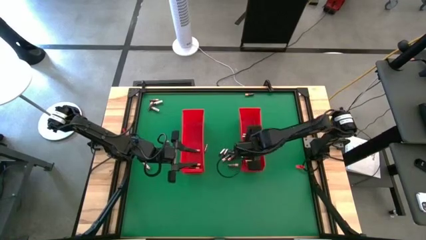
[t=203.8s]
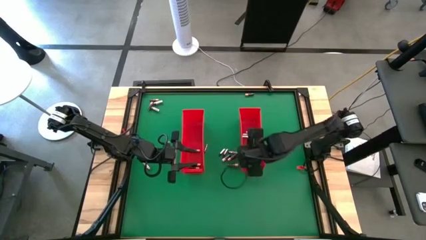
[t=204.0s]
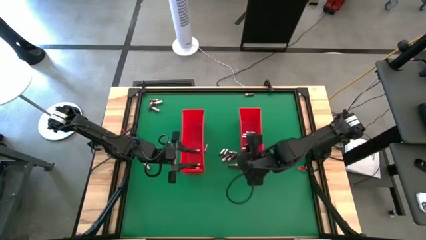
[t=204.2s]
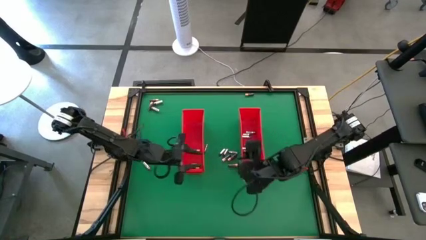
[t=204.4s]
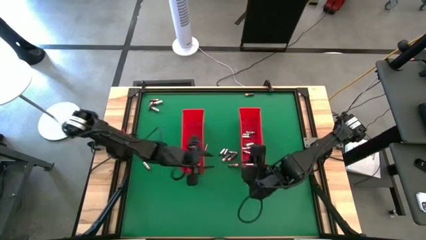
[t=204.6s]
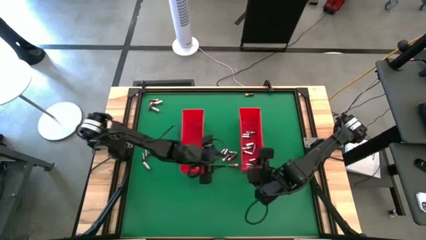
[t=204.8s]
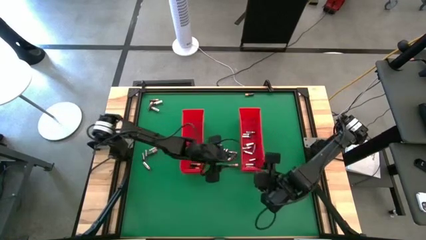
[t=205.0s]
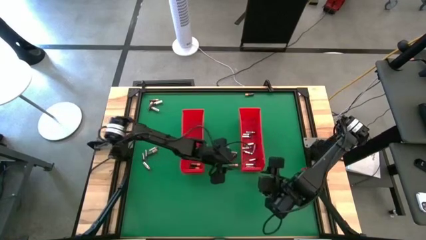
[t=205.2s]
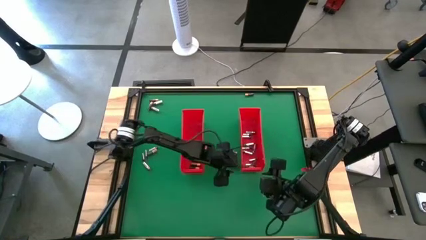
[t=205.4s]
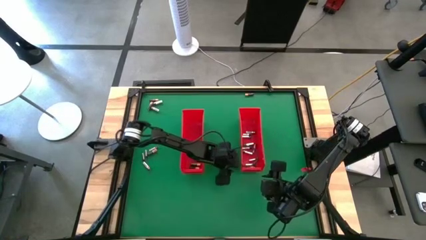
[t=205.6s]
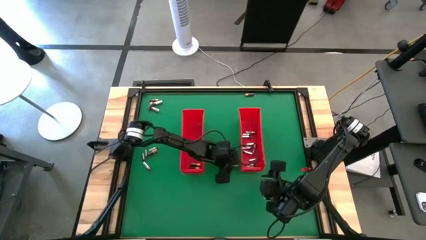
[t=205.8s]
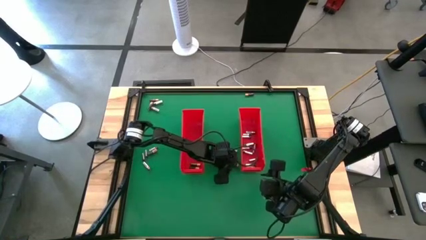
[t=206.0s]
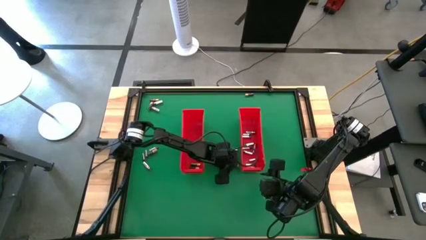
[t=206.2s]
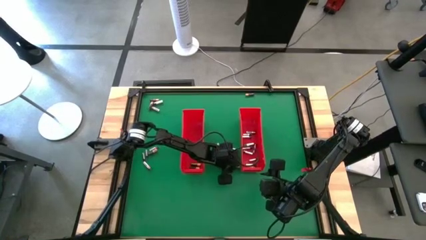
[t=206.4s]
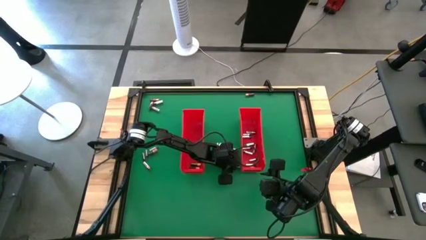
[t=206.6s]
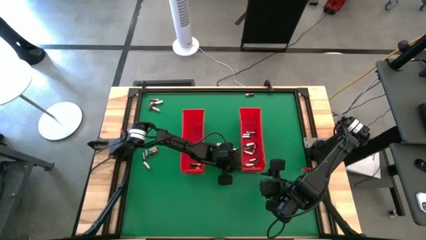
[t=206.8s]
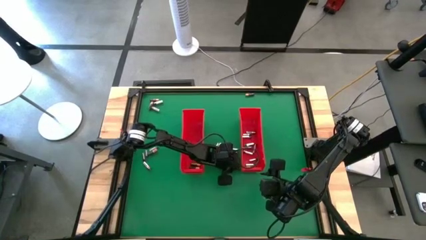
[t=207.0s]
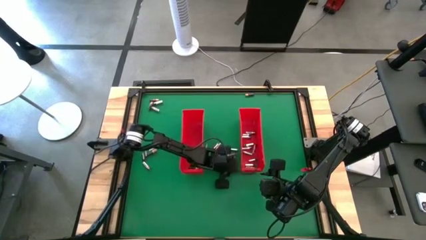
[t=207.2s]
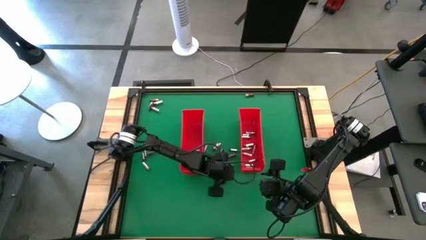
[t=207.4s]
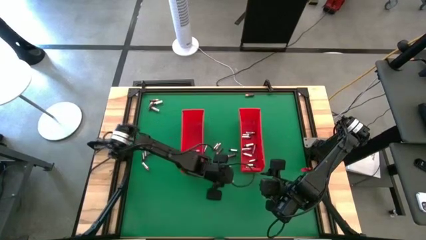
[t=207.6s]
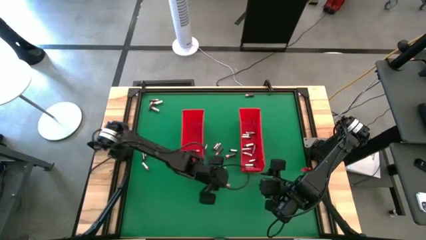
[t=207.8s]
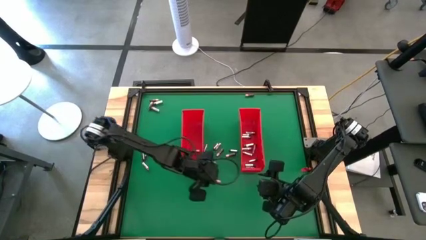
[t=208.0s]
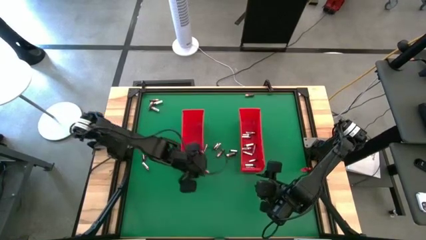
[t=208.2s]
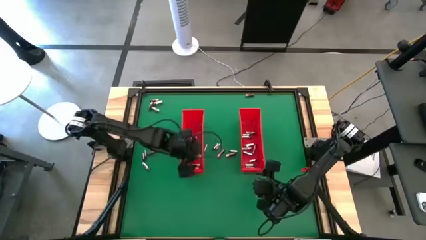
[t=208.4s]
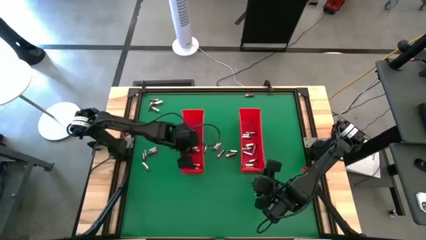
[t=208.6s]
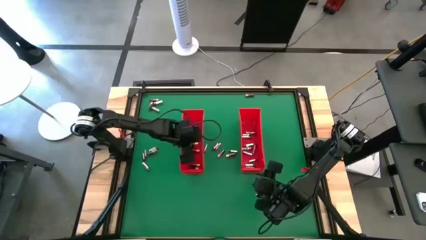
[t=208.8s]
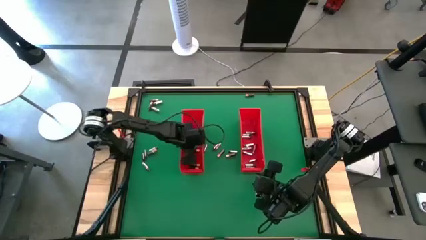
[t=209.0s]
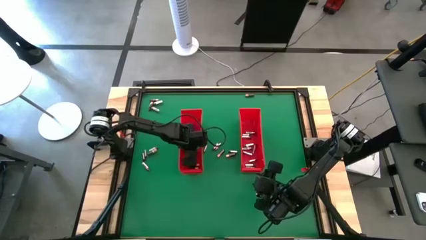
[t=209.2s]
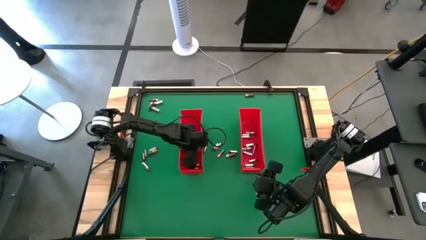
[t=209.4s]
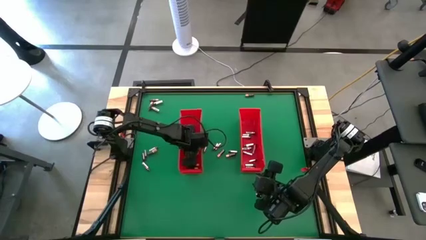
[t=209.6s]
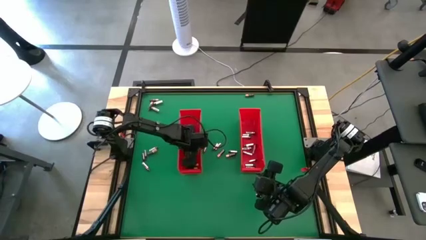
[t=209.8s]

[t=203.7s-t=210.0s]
Task: Sort batteries
Put the brown battery into the left red bin

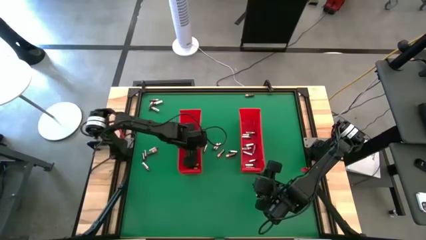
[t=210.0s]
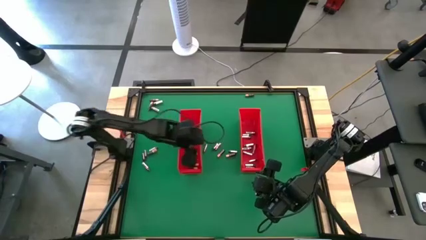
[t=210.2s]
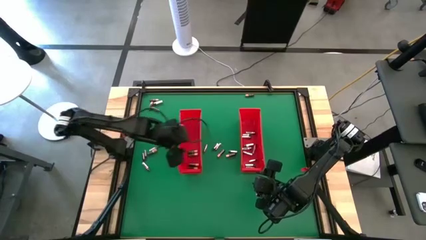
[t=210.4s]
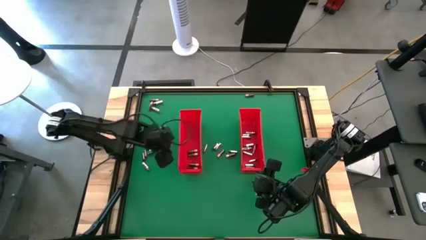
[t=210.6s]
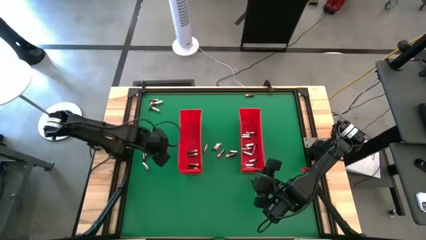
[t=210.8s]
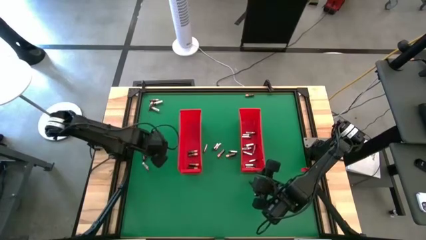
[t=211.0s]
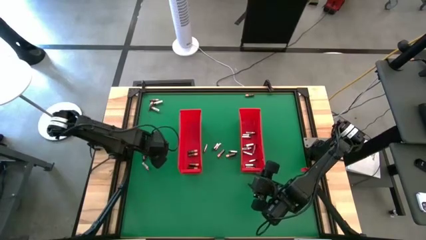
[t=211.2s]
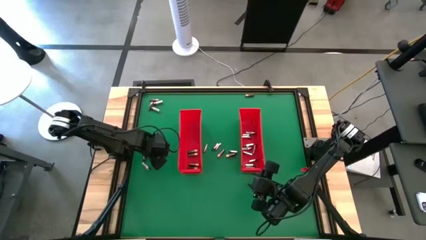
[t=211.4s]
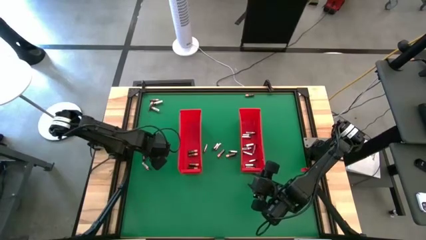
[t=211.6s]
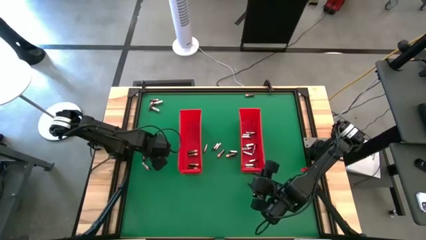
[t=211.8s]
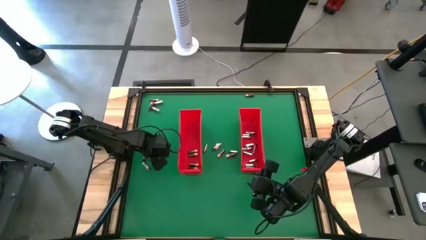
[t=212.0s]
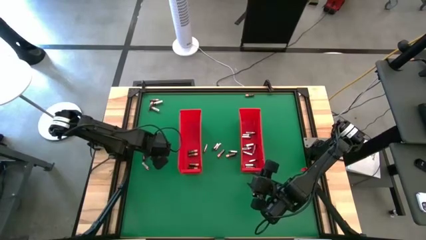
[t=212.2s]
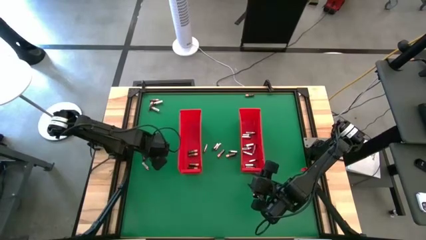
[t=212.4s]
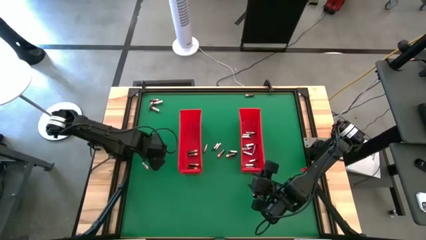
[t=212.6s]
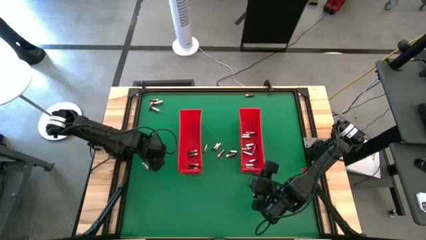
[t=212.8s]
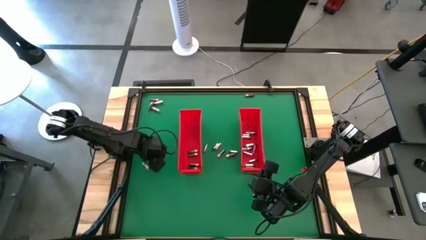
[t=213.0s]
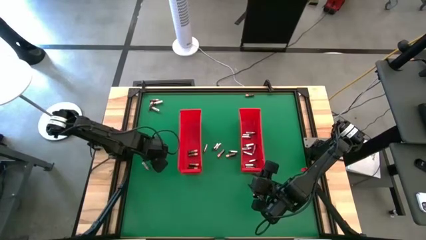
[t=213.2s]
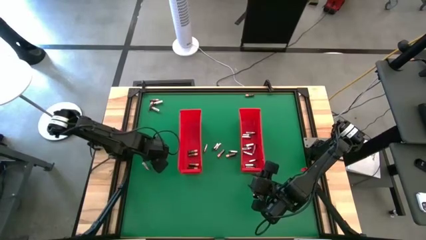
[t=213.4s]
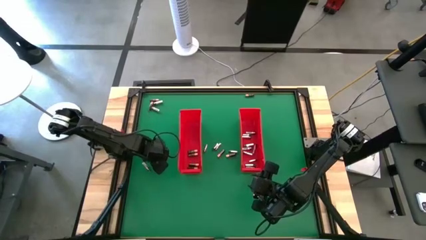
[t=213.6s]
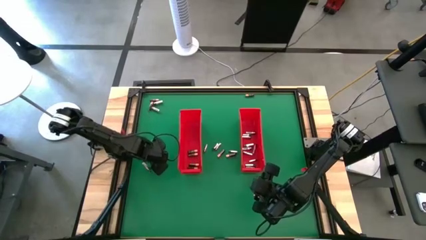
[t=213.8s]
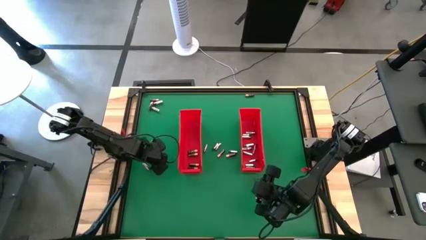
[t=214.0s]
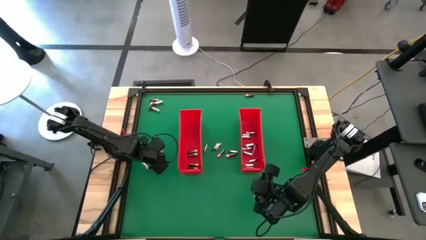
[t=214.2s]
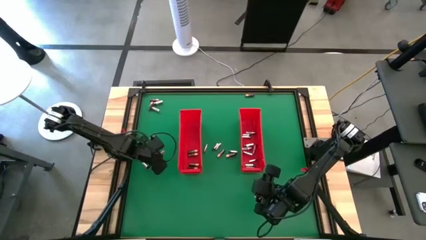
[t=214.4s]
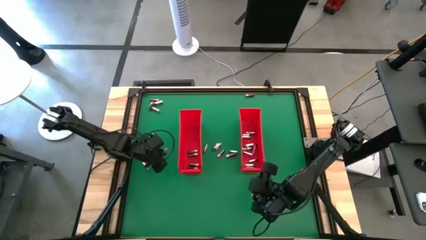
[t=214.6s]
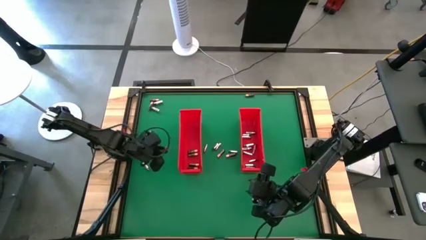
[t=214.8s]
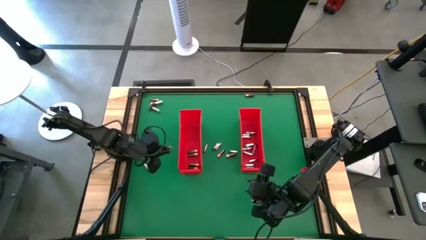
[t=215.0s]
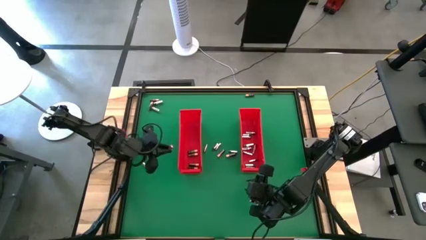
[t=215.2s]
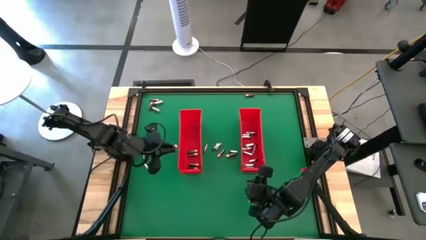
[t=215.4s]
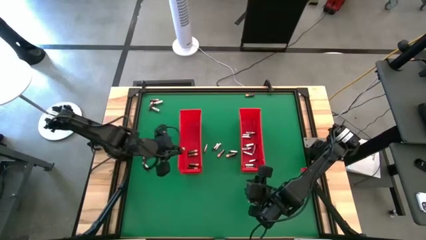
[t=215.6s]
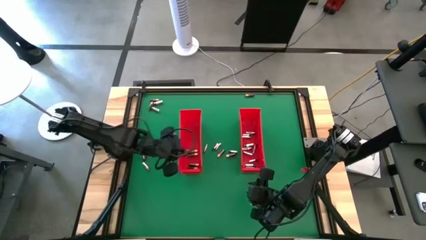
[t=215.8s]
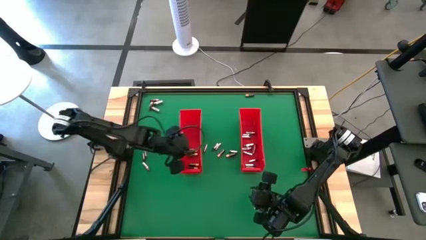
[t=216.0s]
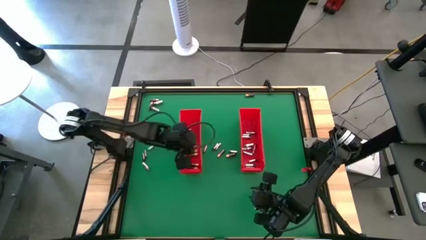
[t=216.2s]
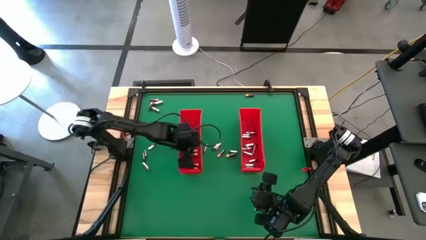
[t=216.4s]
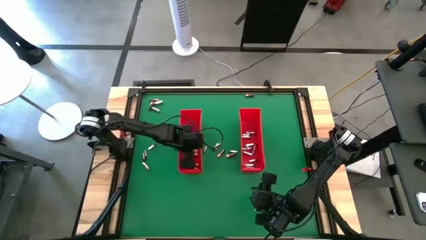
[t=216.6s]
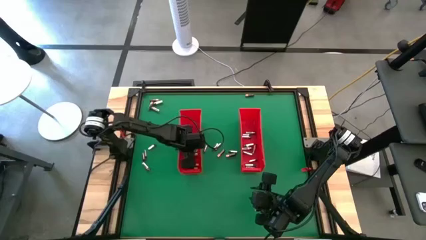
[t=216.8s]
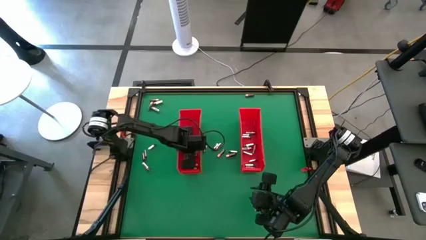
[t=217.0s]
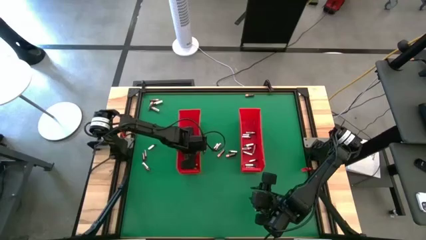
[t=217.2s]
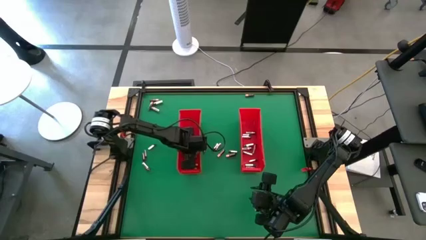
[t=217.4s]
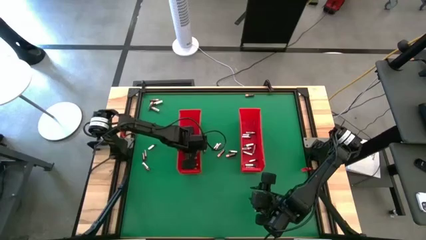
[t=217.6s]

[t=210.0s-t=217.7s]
Put the brown battery into the left red bin
